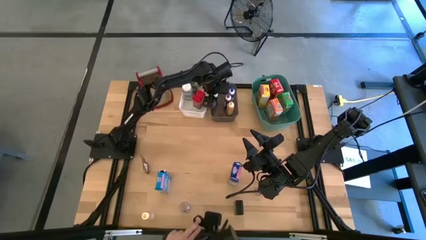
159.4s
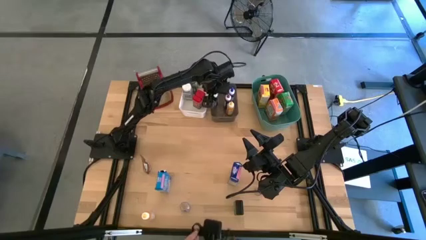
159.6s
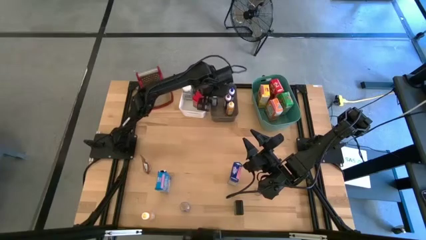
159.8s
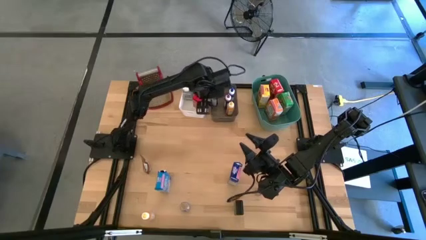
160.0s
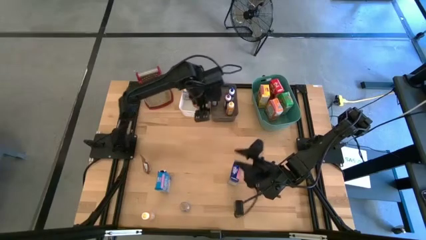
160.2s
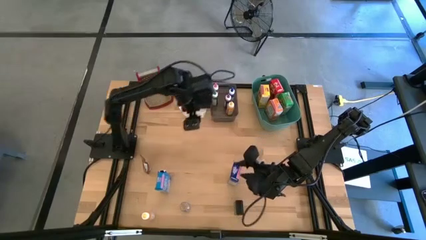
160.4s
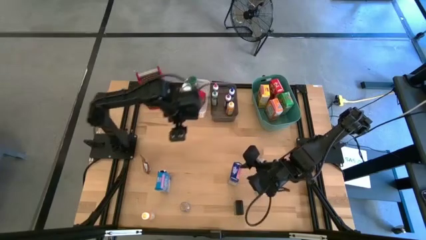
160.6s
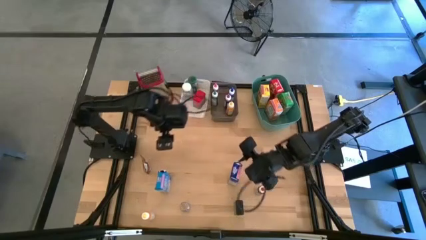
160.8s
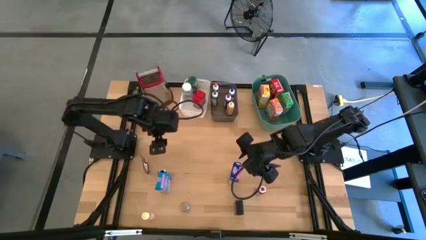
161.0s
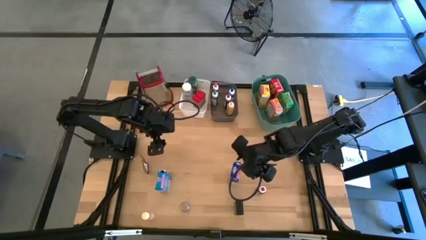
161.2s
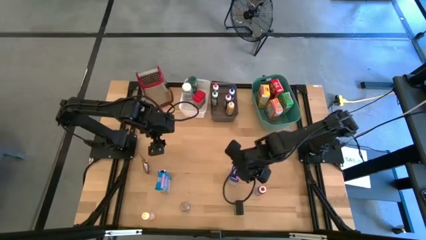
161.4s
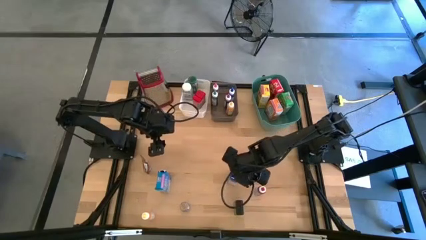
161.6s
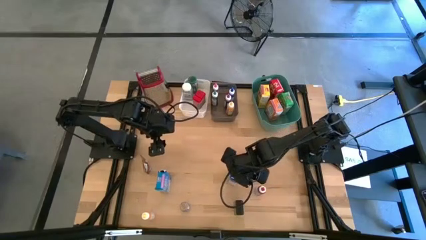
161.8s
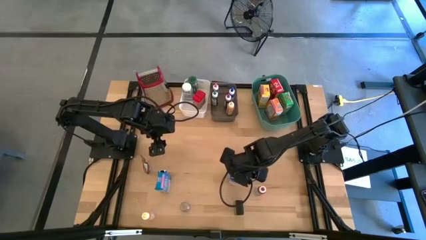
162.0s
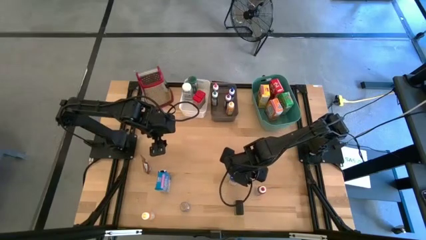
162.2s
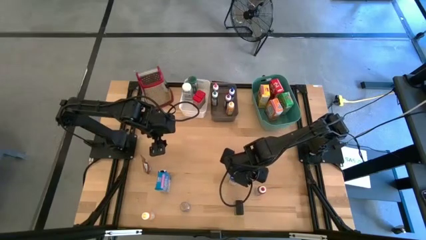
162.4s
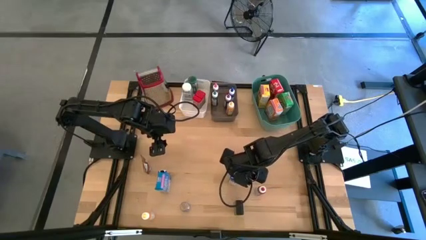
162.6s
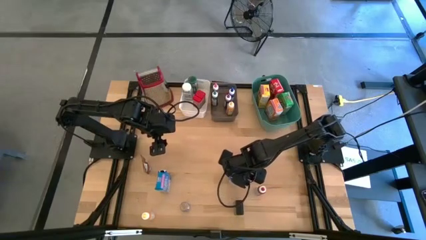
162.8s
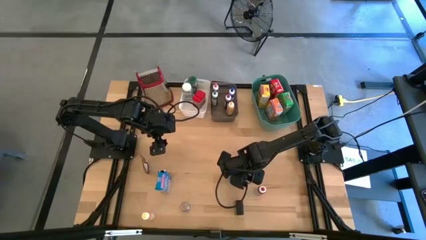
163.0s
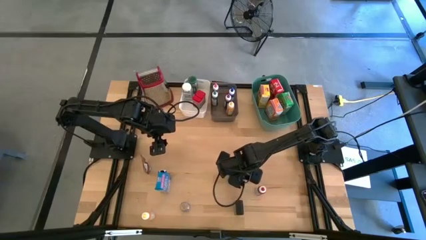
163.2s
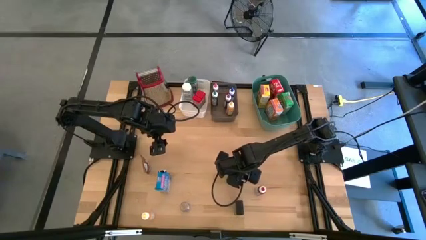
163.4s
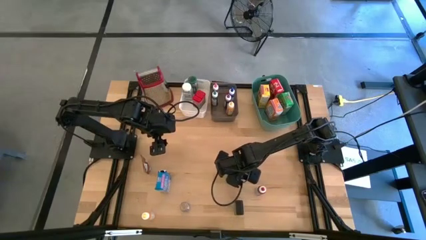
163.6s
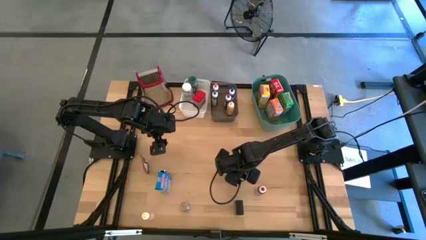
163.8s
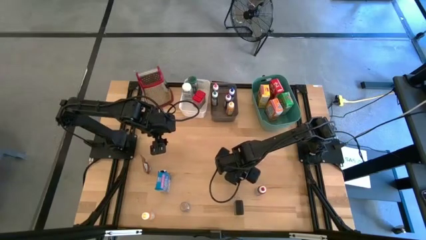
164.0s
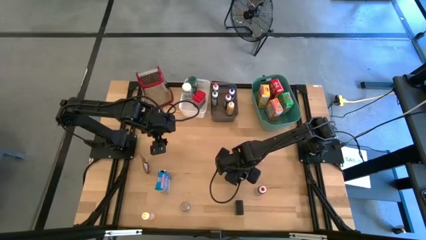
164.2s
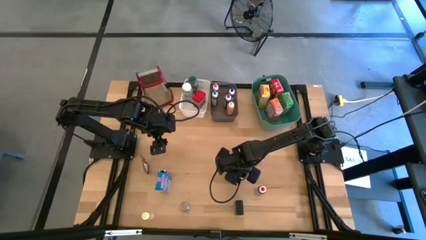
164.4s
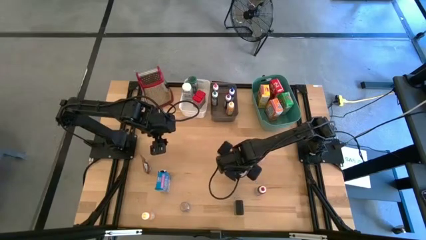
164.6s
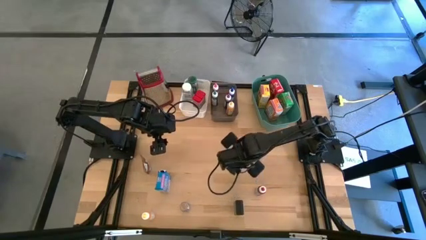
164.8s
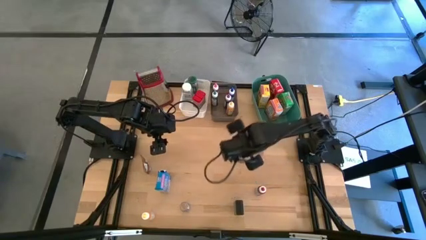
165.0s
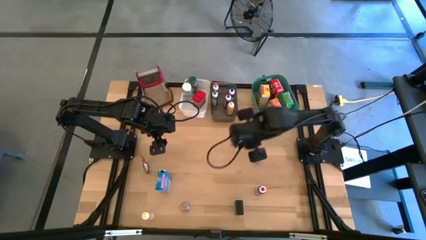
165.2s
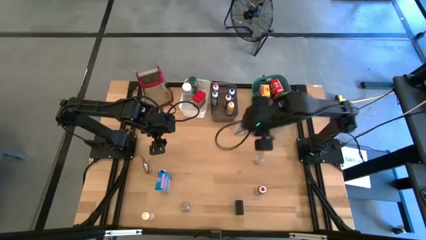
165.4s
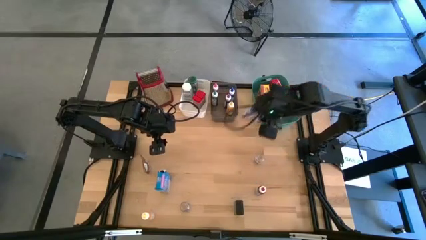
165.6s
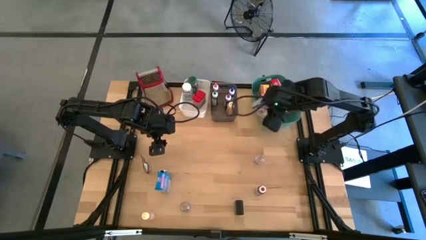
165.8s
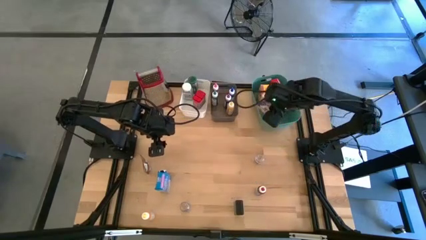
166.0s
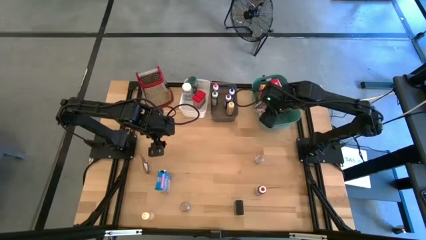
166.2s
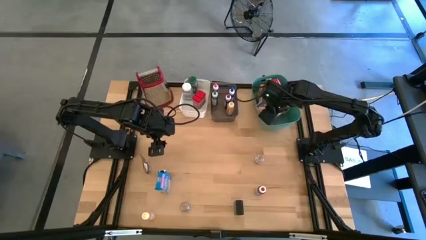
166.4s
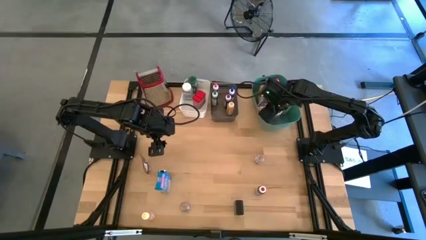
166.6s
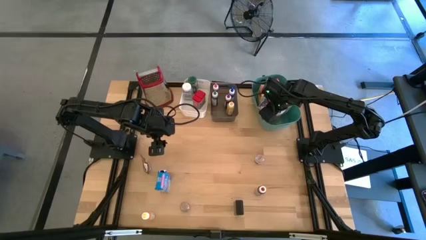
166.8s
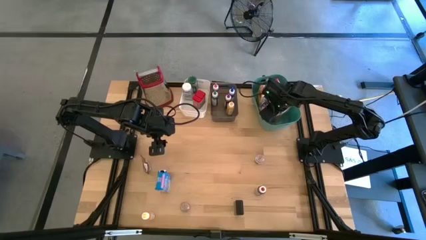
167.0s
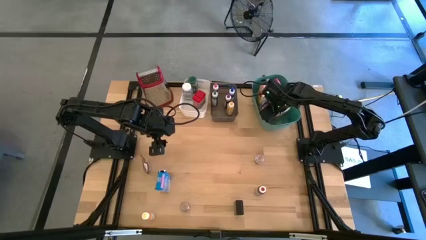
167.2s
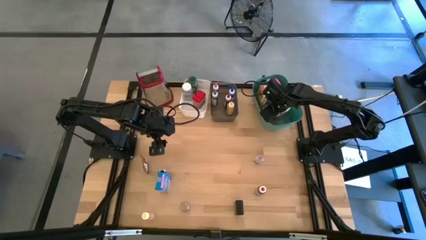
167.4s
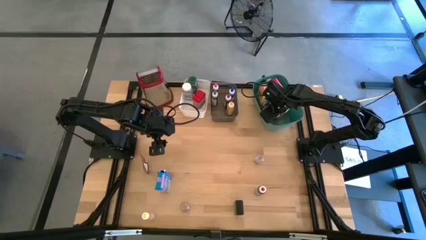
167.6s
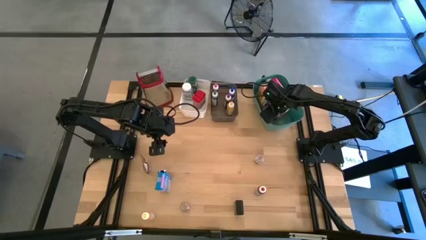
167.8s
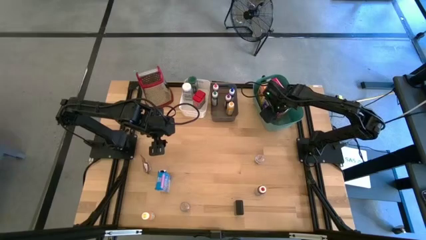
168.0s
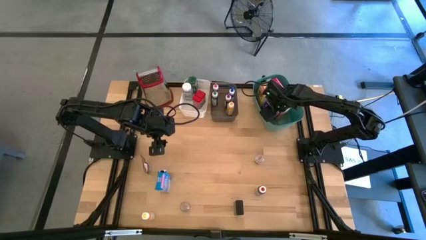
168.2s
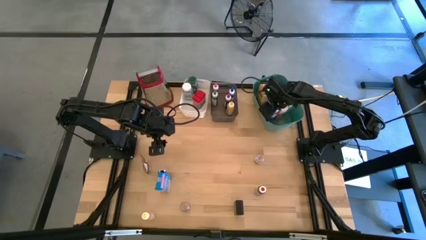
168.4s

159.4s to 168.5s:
Task: Pick & Place Kitchen Items
Put the blue cereal box into the green bin

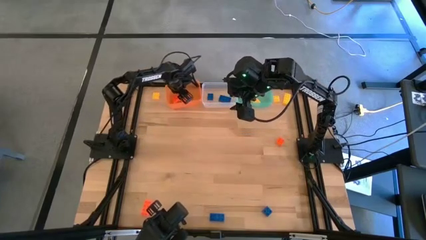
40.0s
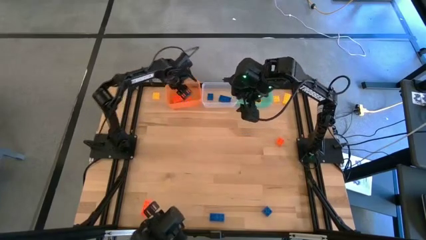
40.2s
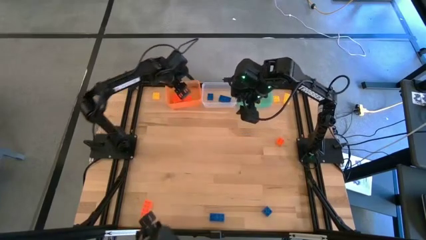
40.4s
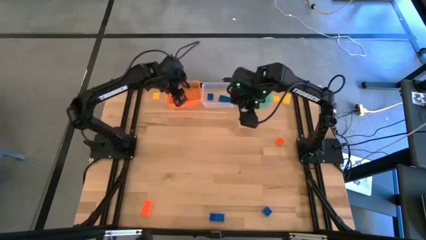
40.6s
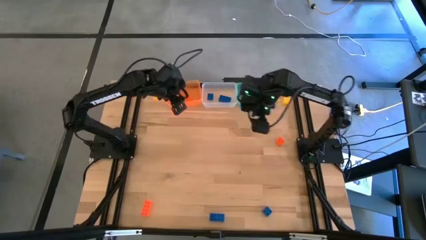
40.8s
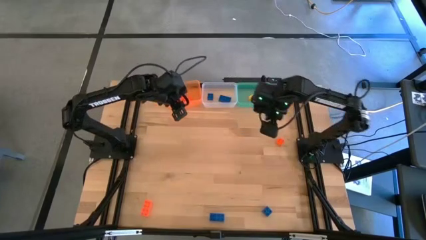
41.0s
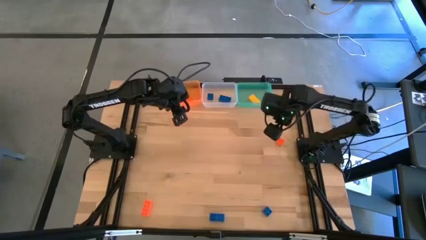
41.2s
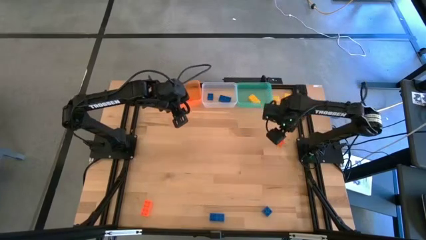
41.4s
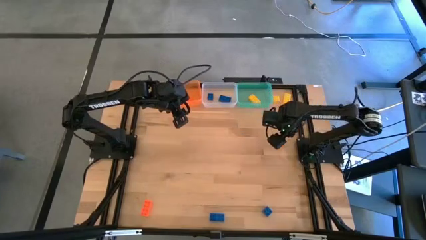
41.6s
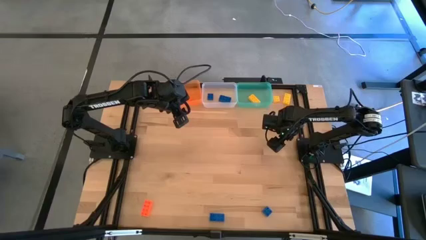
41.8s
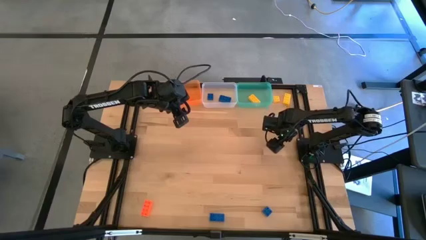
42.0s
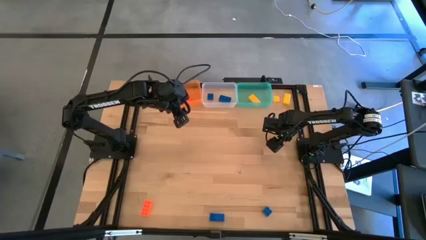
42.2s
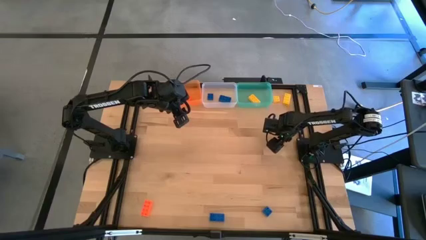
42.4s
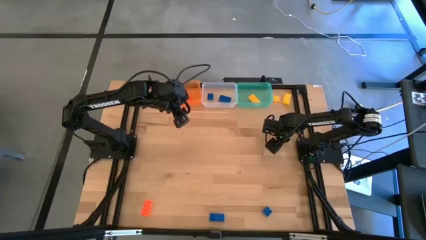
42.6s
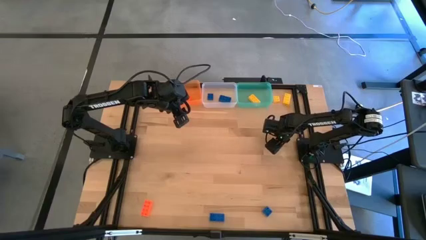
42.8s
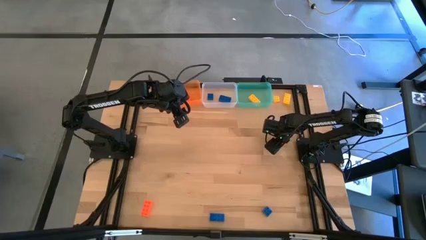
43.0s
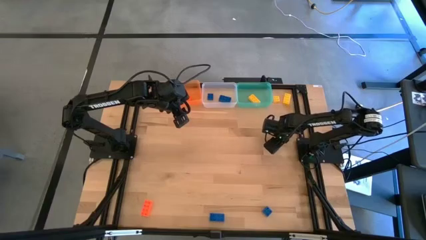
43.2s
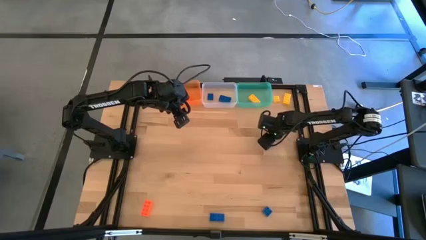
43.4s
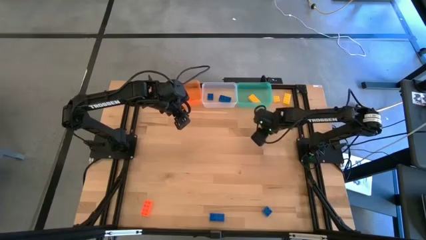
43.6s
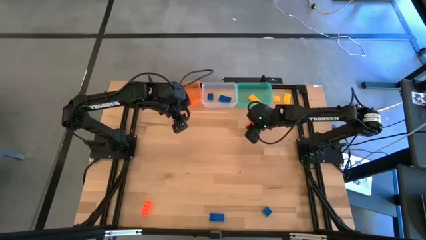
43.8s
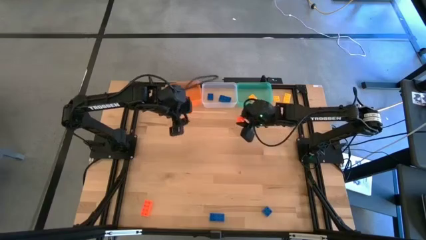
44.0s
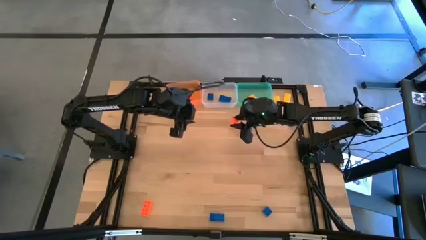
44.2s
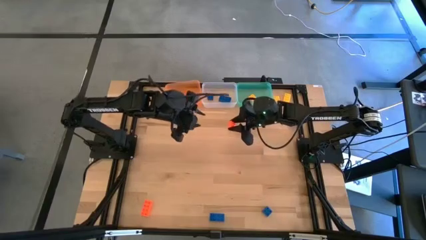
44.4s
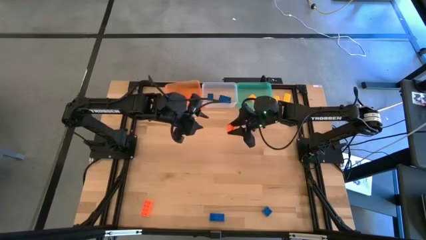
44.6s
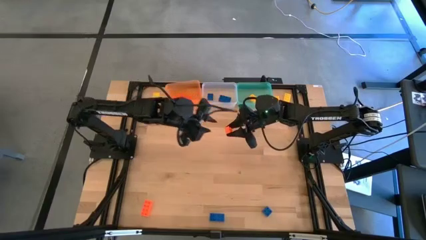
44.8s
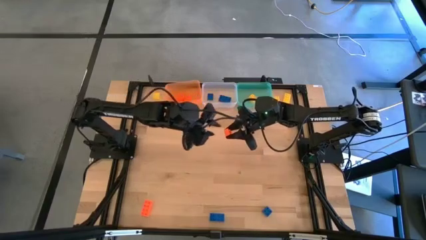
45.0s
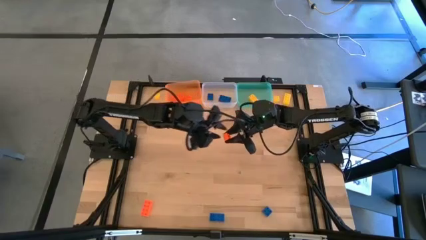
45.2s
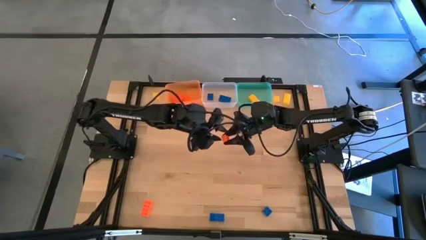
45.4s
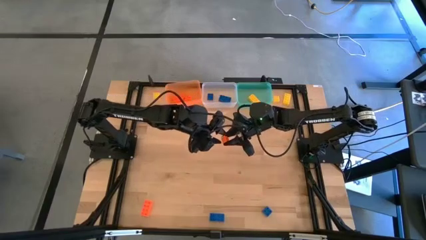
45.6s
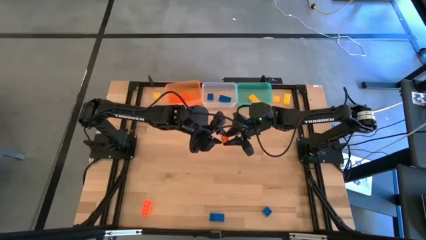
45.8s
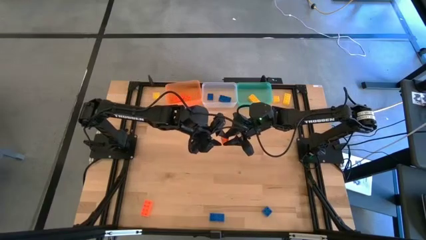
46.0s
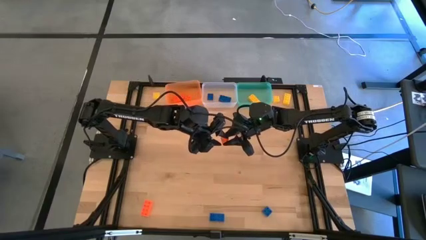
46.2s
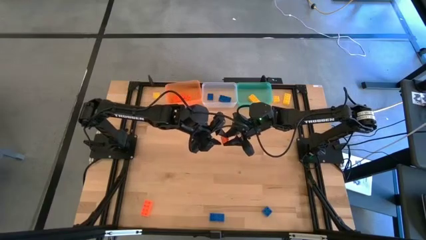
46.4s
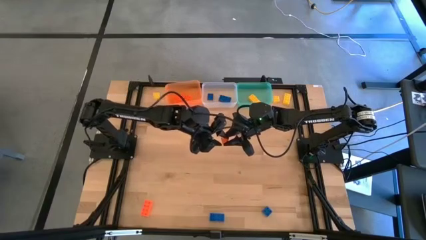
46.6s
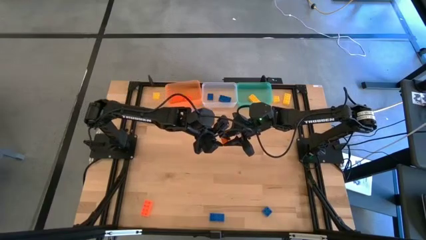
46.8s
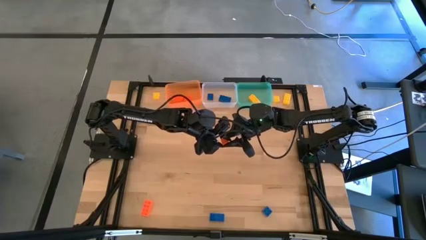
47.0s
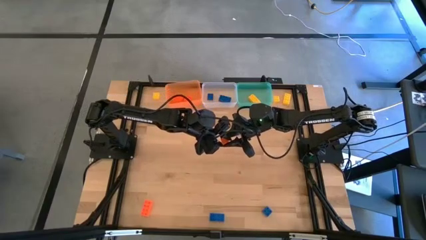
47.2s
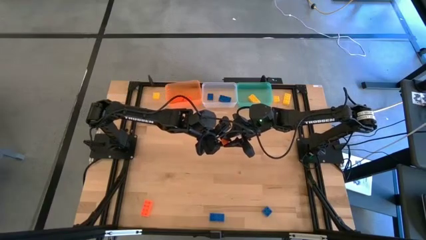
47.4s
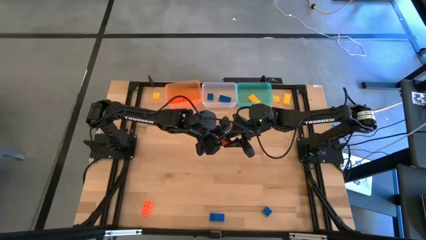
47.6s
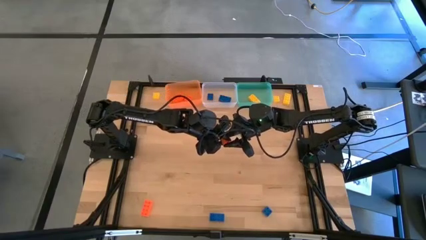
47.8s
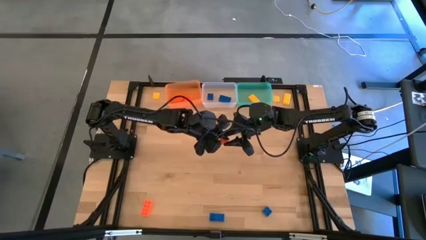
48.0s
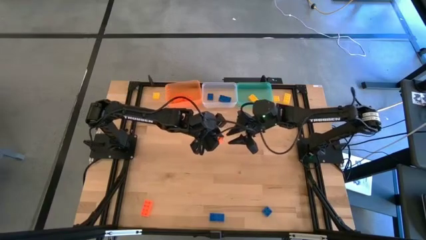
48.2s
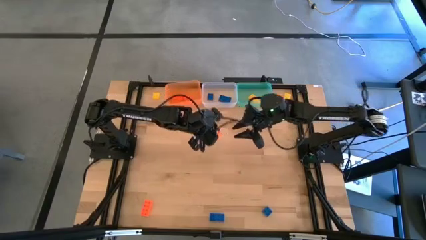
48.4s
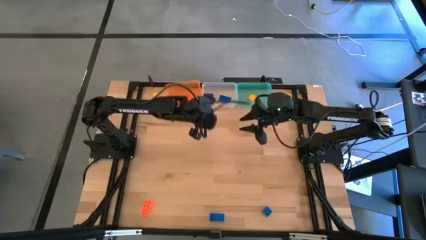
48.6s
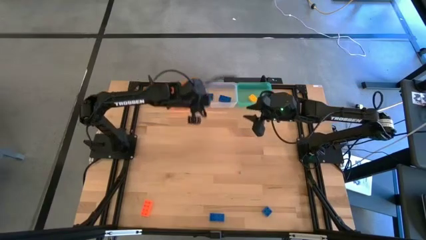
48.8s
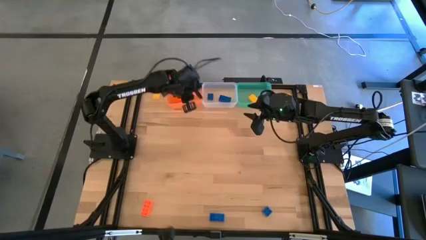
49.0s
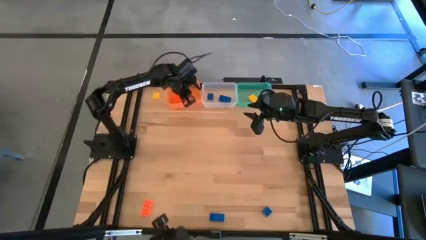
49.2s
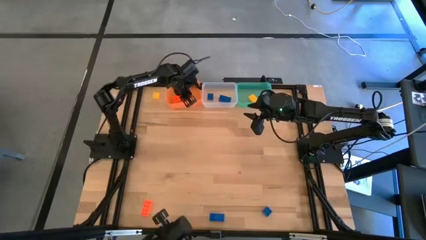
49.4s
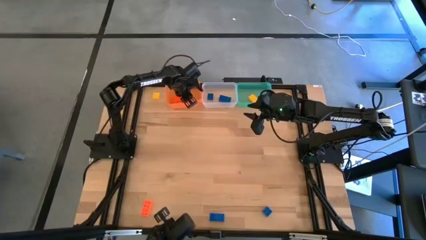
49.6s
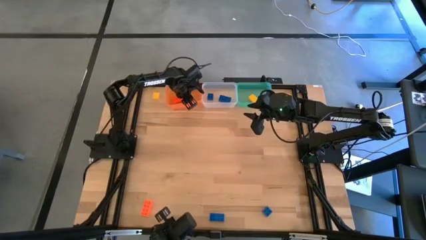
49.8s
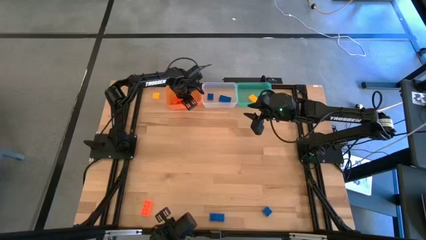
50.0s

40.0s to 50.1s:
Task: Sort & place blocks by color
Put the orange game piece into the orange bin
